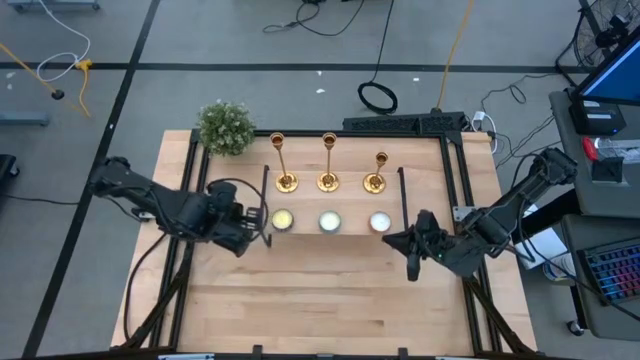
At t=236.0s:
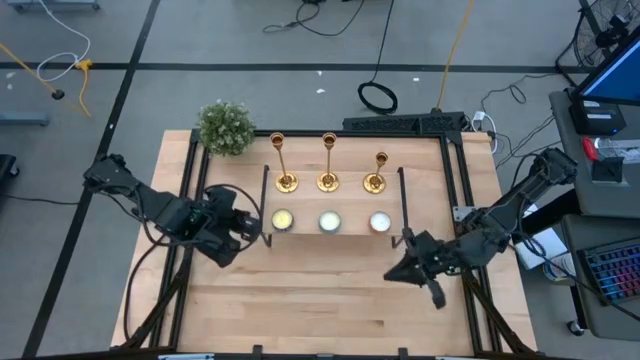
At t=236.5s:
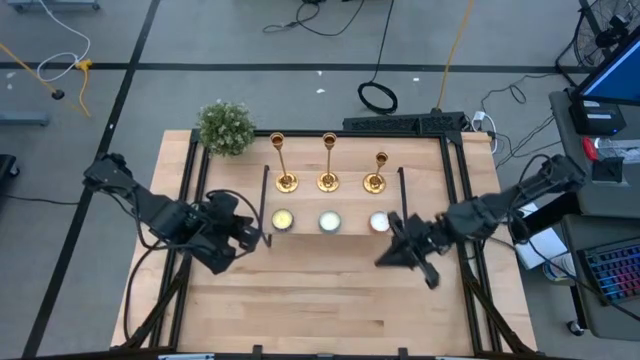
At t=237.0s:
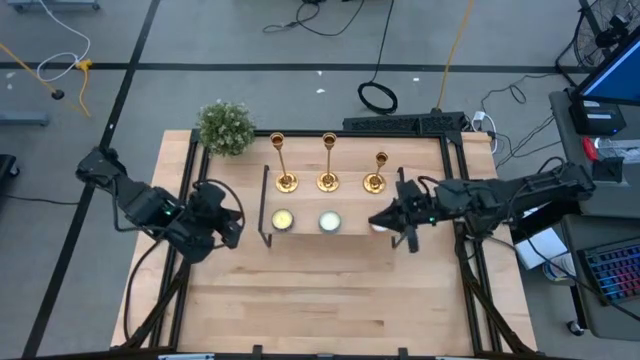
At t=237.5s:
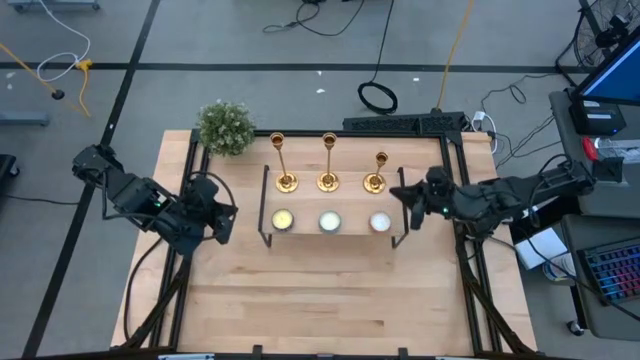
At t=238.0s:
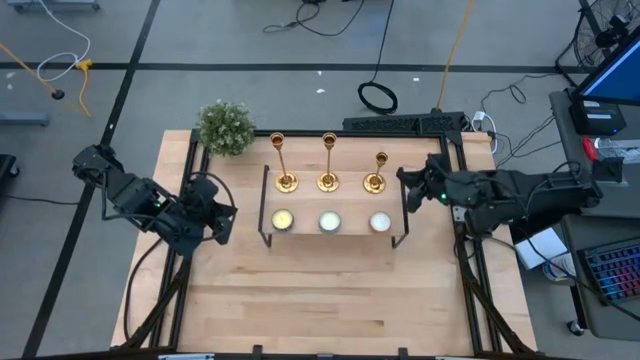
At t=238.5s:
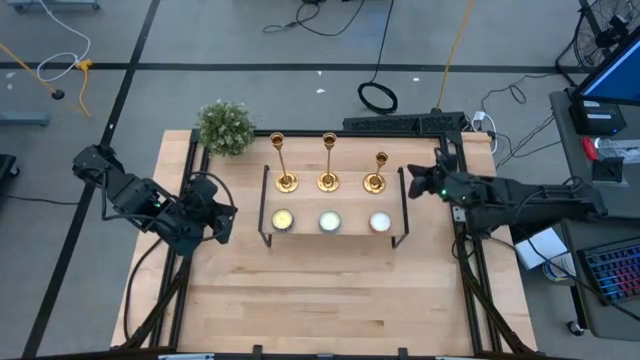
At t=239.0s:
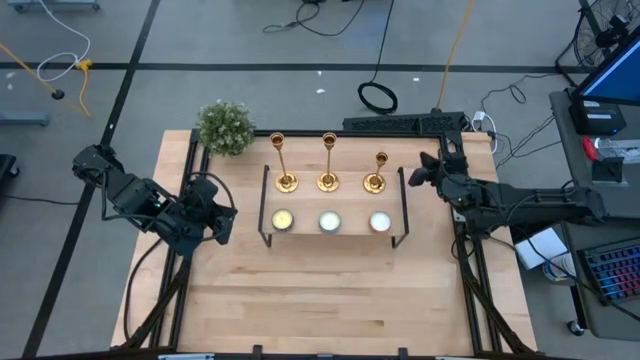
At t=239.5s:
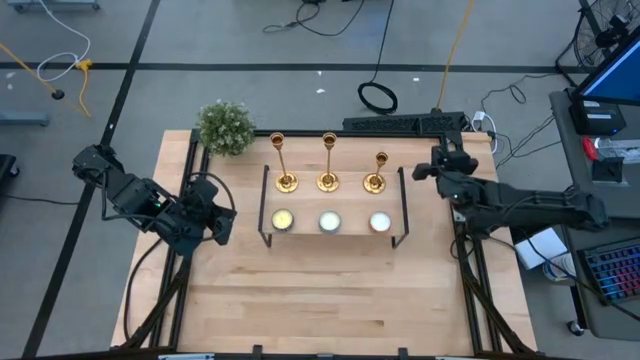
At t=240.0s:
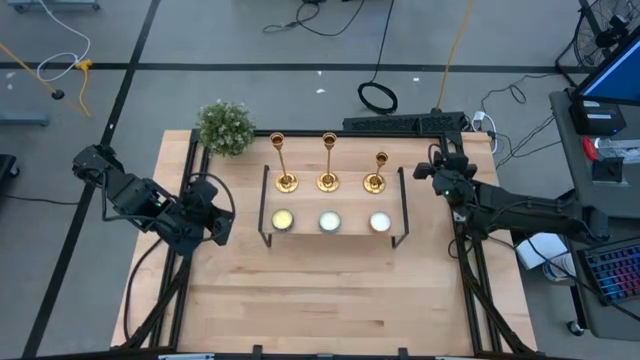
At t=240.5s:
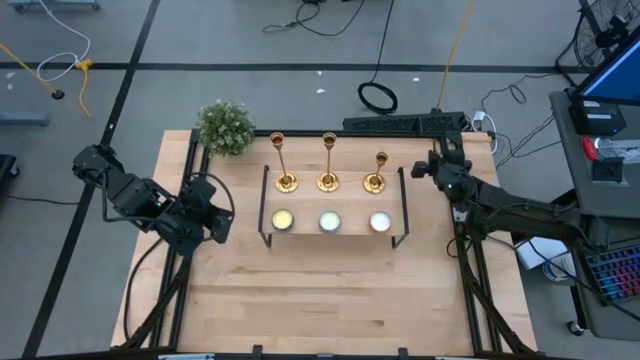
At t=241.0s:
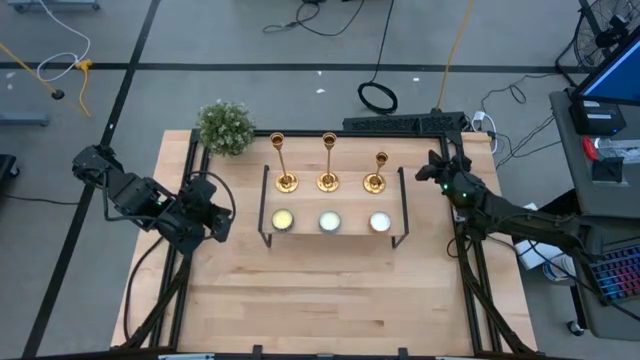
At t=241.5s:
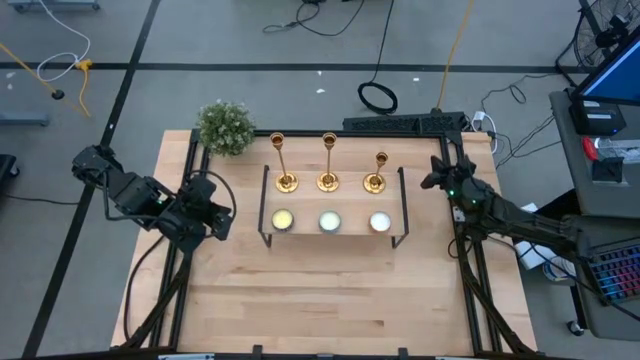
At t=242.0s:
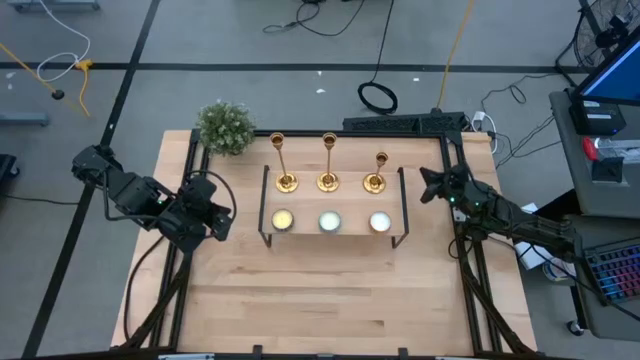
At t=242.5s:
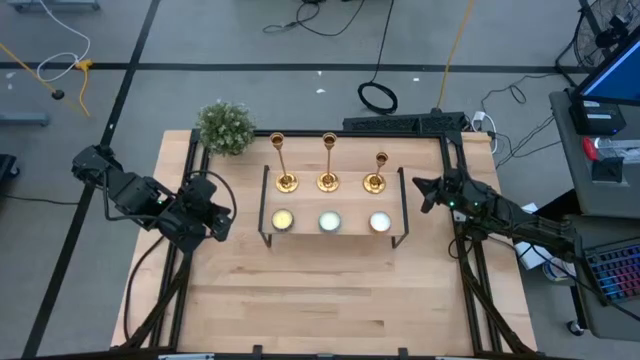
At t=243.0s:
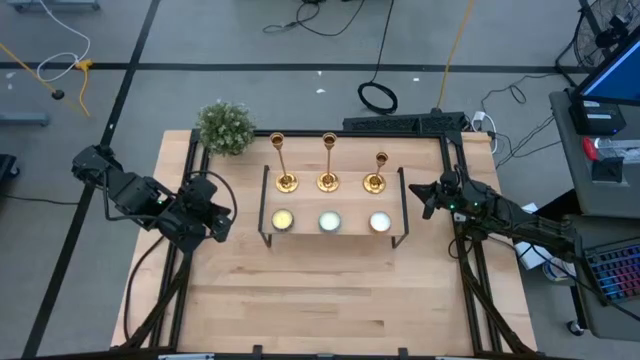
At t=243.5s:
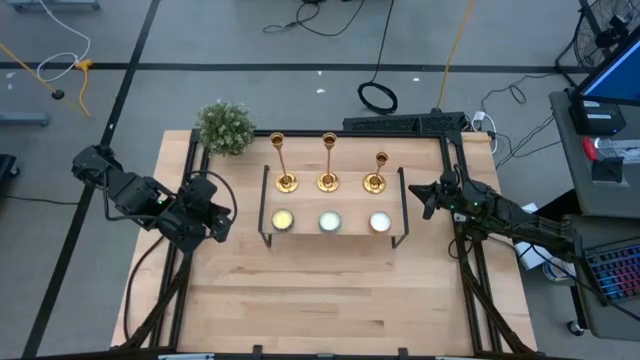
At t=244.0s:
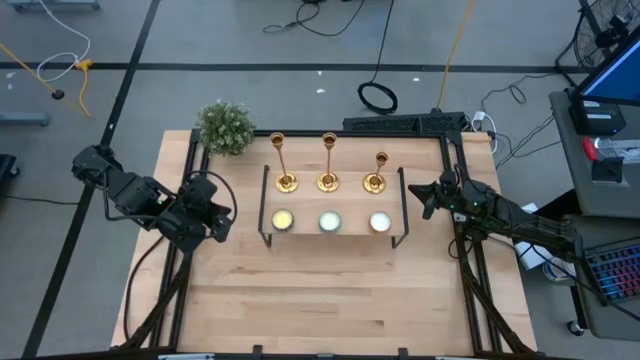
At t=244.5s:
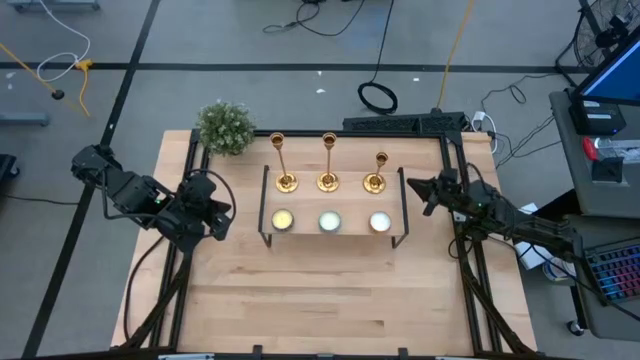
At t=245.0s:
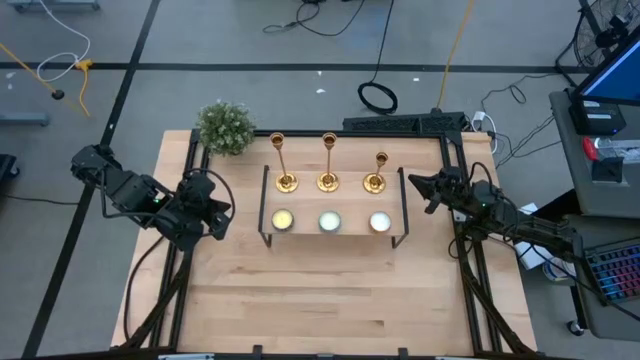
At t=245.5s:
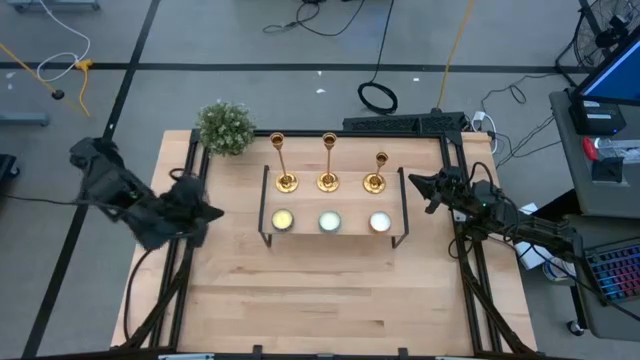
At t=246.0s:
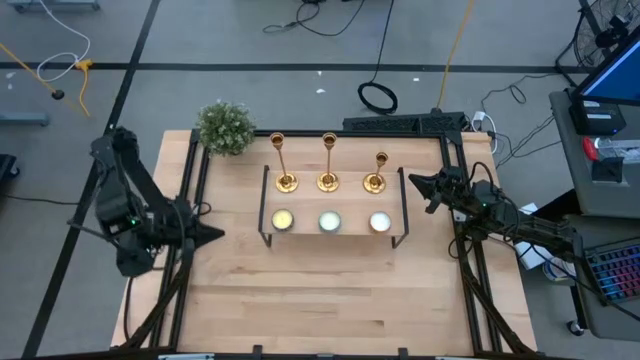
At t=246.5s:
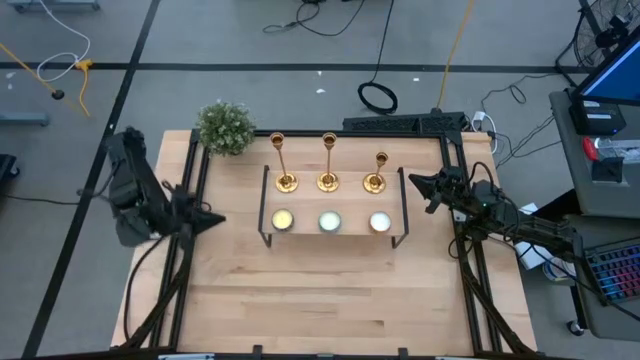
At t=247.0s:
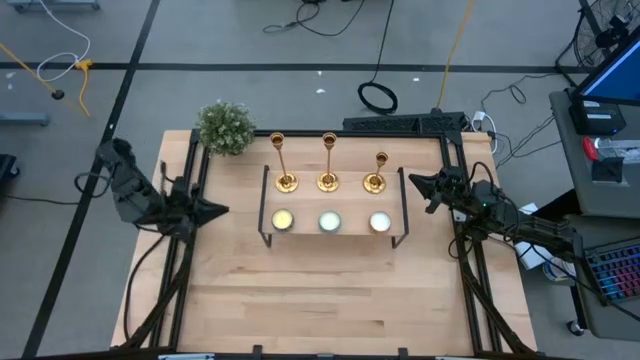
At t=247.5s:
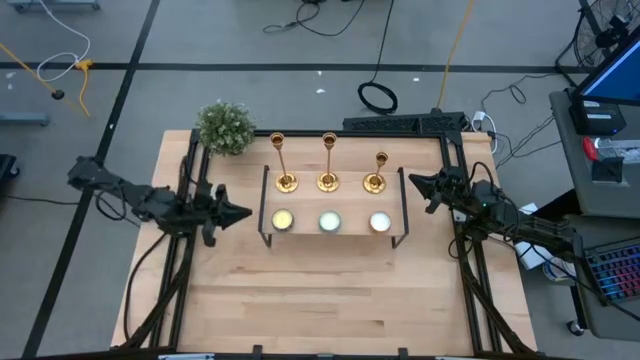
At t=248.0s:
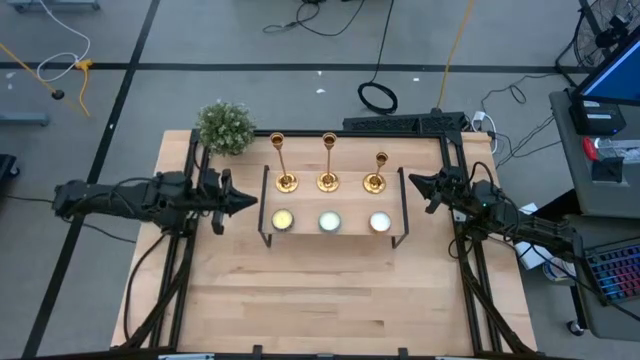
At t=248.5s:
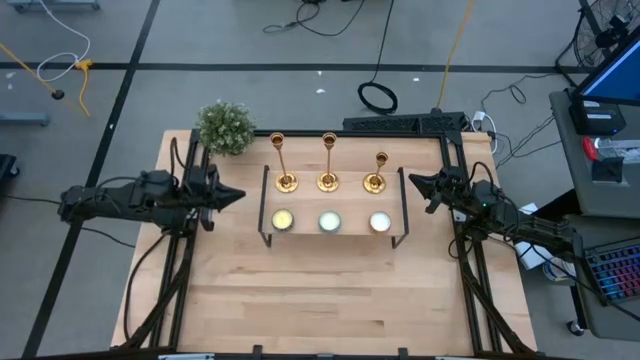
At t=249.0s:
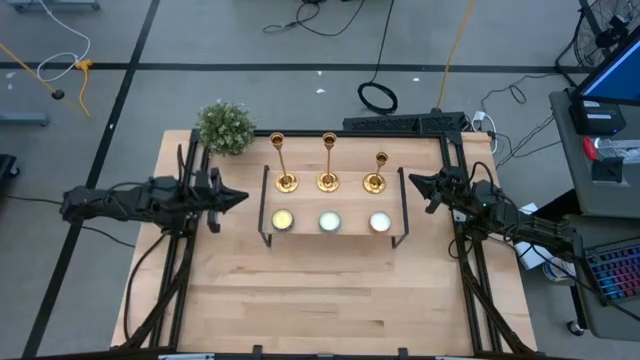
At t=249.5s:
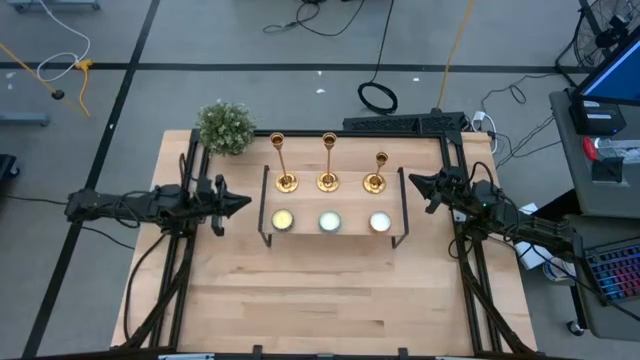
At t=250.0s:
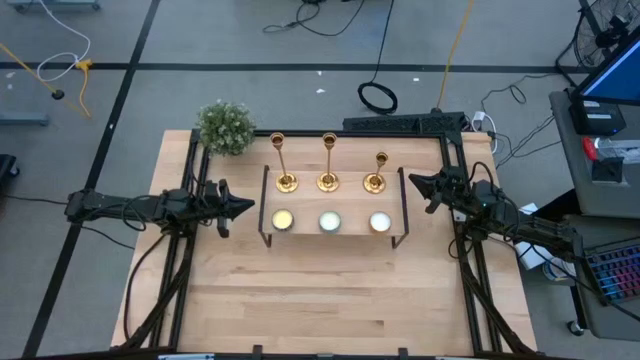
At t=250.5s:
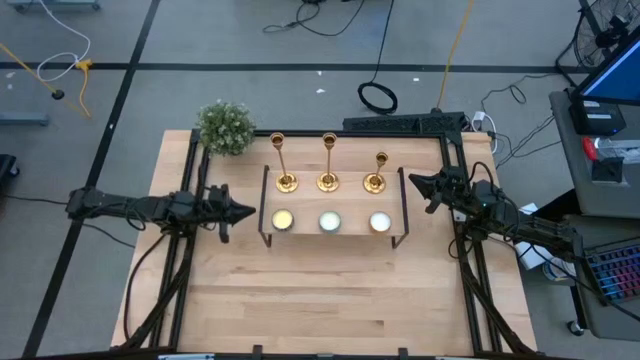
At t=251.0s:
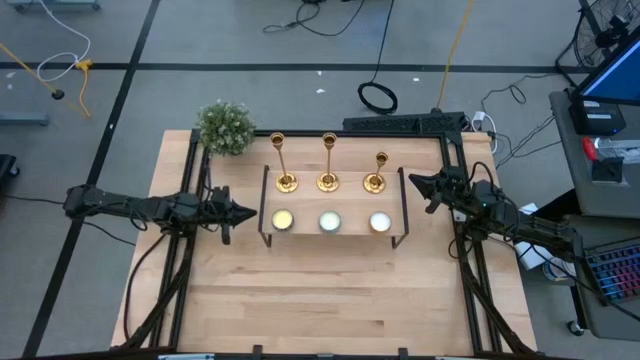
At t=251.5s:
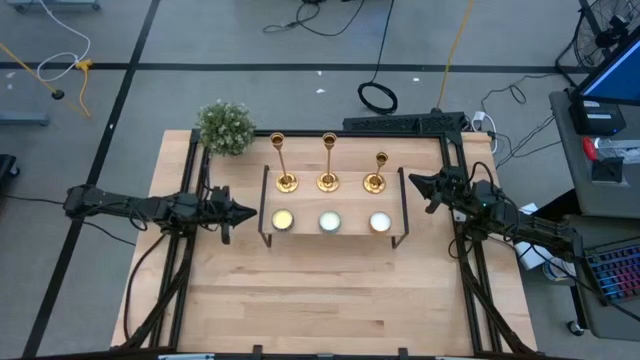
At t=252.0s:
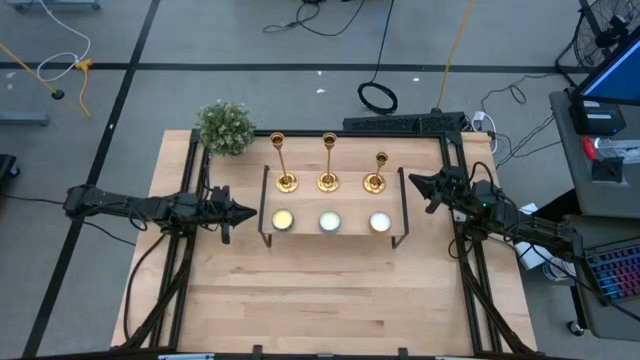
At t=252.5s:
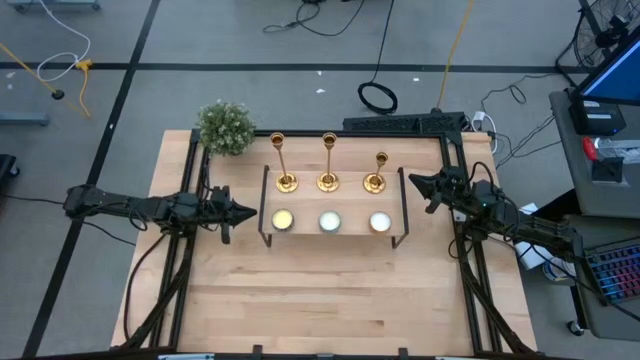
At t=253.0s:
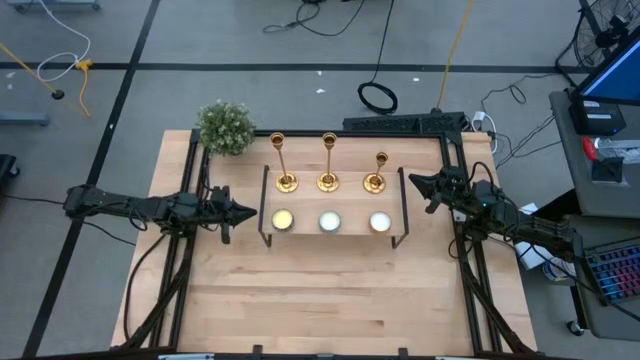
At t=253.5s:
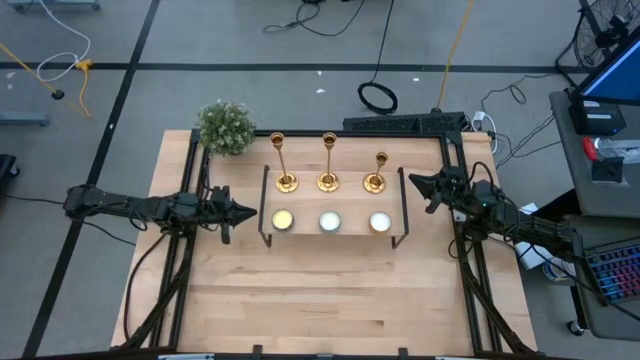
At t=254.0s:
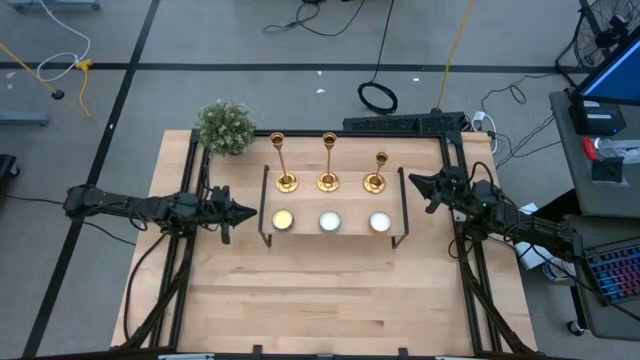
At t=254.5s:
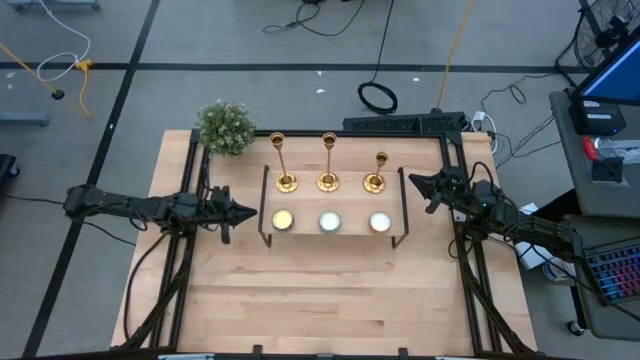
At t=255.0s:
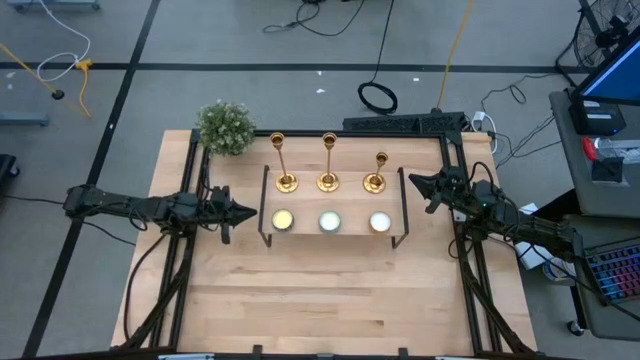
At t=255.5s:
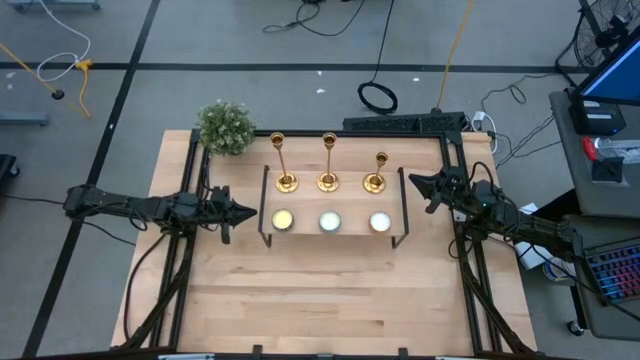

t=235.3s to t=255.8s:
Task: Pick & Place candle stick holders
Return to Home Position
